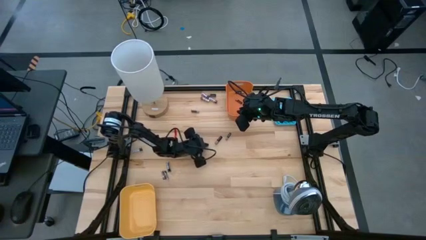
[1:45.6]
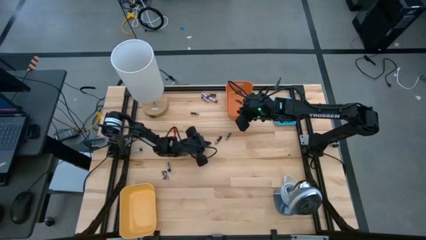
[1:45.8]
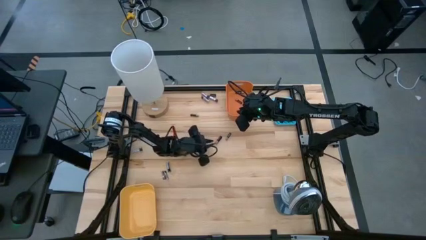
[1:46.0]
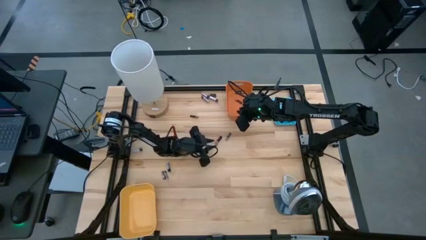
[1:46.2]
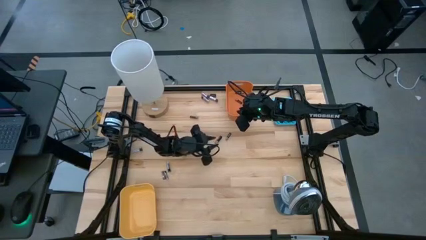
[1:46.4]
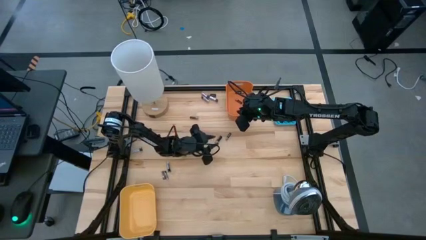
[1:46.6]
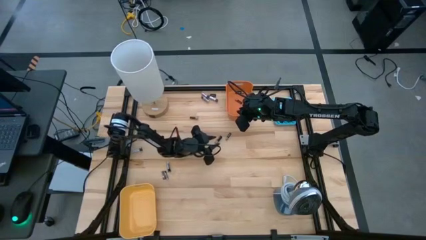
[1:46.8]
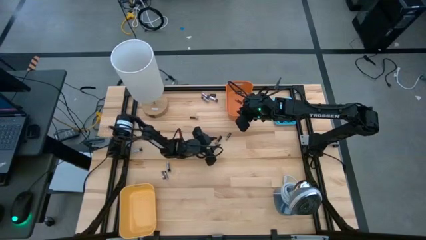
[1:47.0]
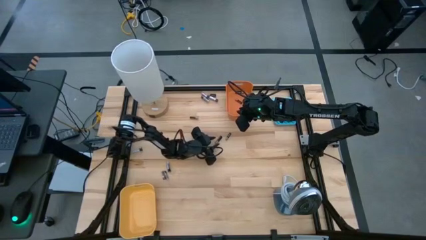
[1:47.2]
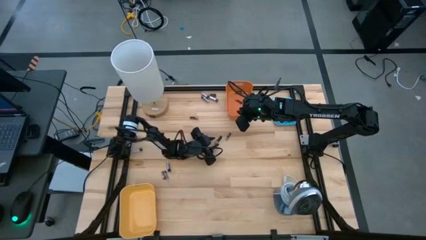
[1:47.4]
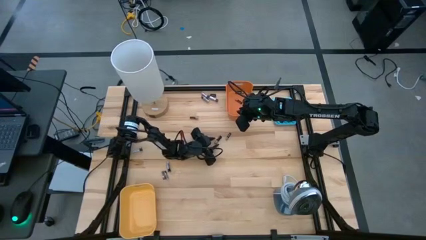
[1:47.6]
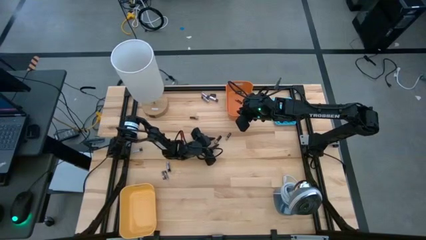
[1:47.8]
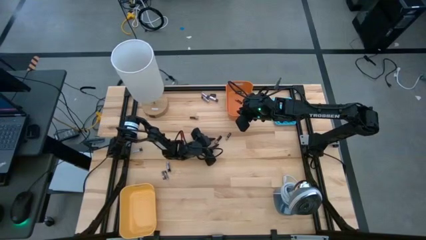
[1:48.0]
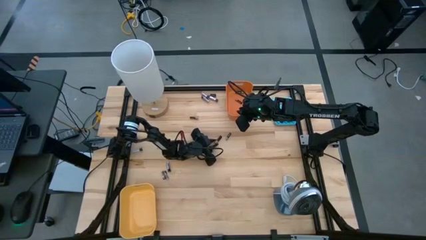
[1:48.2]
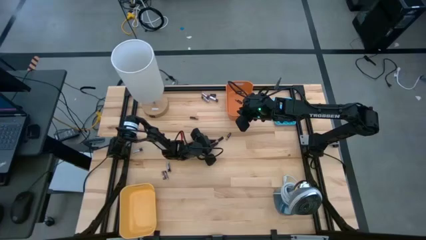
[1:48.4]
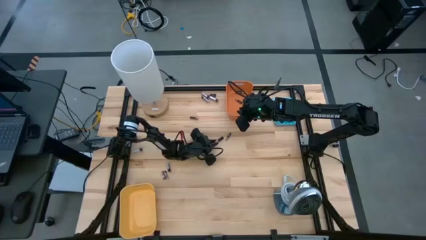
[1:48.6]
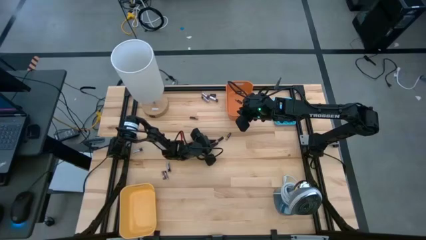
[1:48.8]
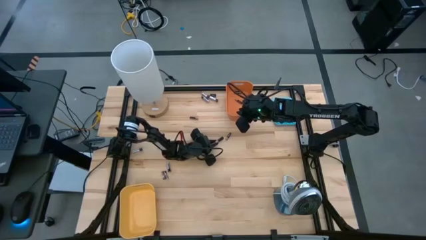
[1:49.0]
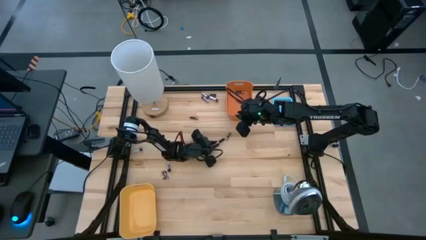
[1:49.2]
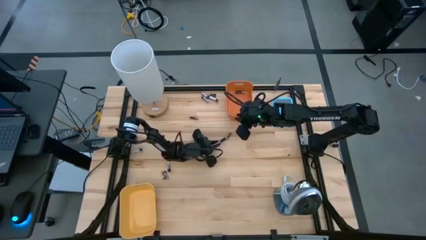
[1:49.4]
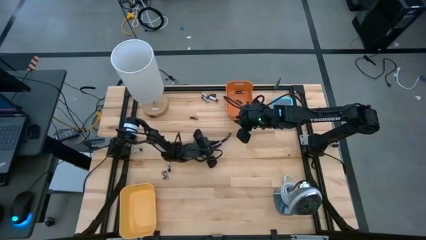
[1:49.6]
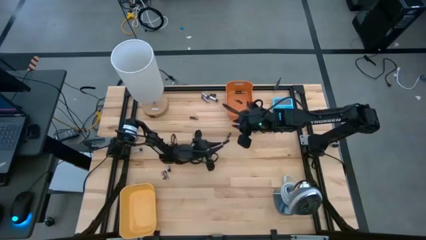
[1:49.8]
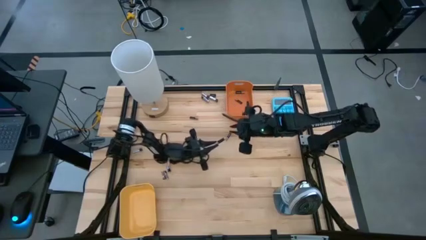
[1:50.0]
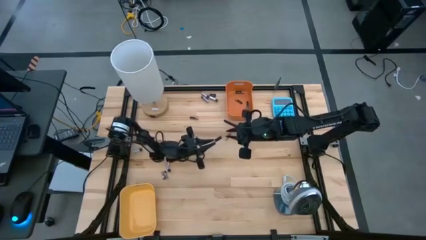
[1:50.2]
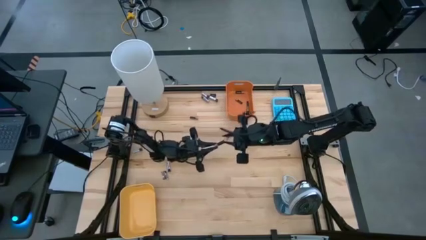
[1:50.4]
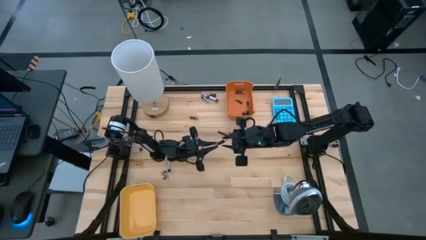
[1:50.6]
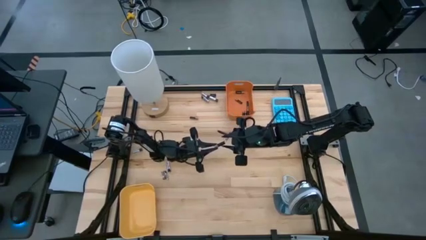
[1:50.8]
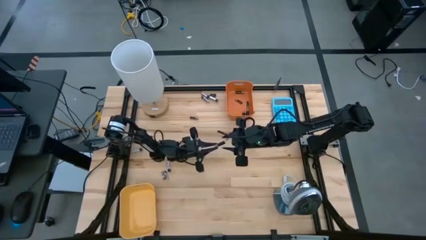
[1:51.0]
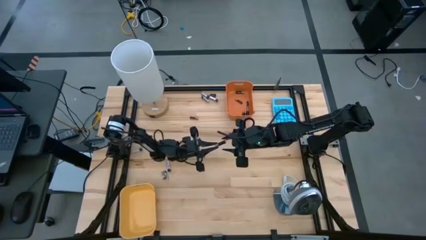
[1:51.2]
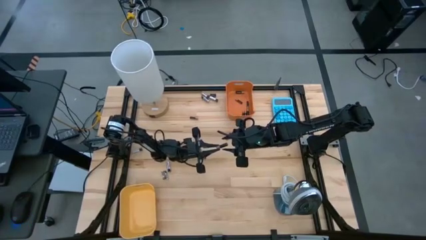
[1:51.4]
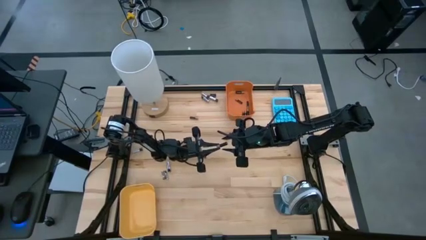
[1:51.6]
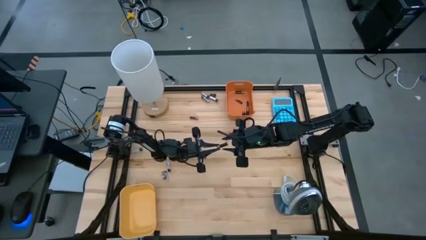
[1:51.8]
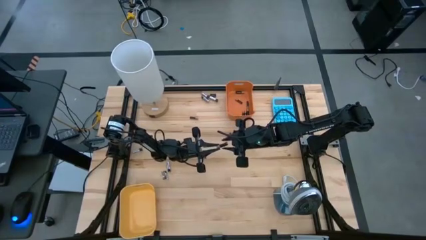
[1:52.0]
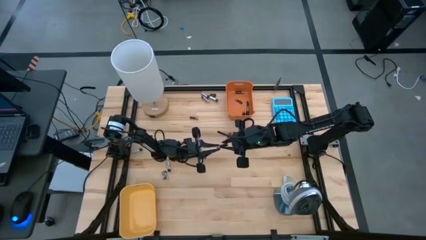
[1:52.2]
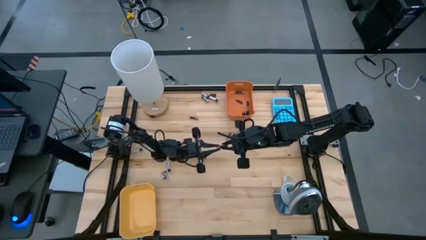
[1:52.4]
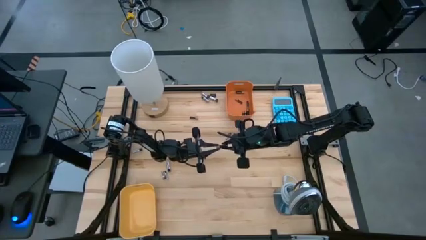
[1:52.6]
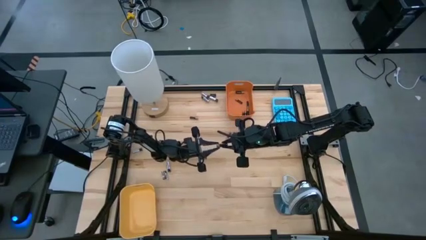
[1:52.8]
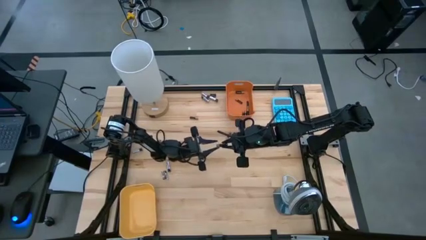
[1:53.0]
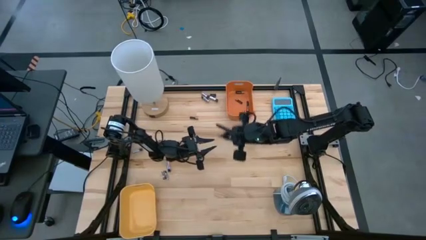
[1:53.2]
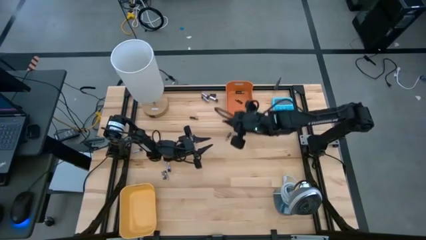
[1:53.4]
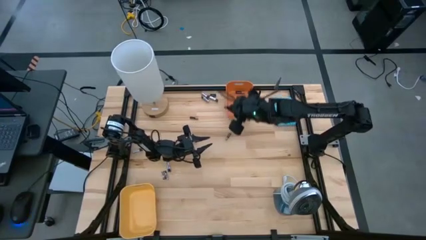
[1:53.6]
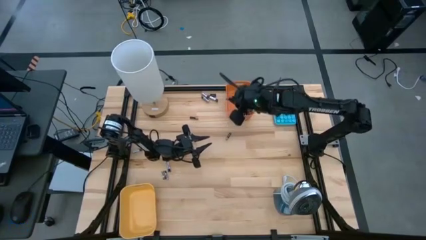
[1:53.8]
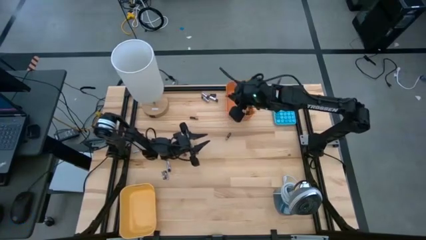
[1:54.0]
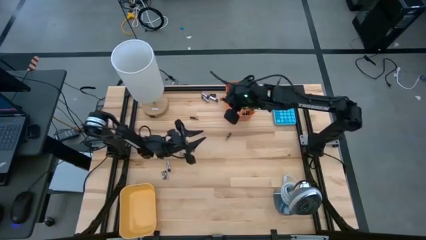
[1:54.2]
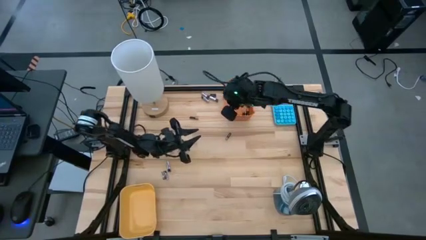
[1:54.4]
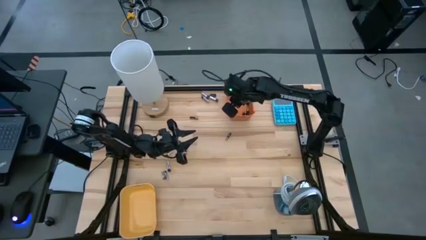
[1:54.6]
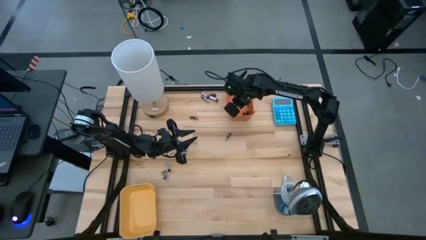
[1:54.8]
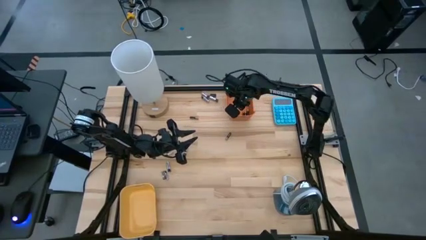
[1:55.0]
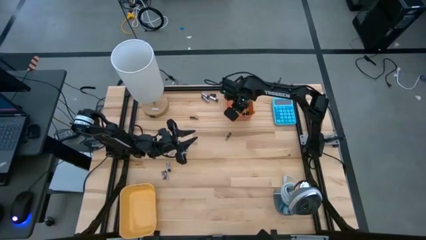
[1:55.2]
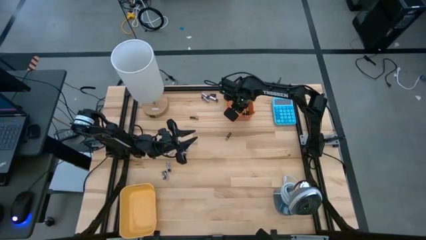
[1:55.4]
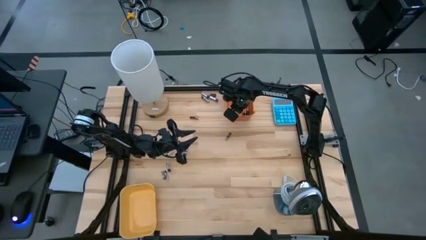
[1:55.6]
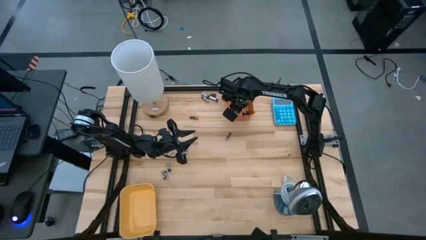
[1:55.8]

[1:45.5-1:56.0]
Task: Sort batteries
Put the black battery into the orange bin

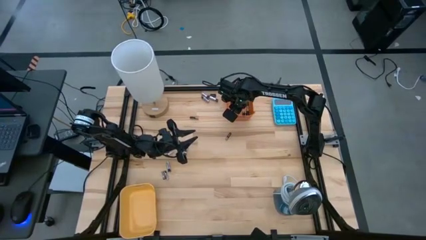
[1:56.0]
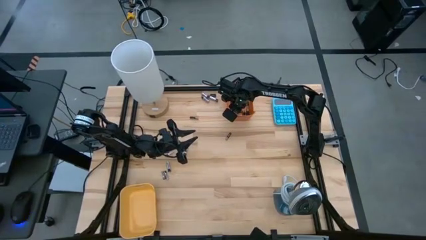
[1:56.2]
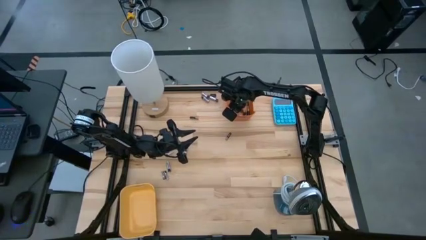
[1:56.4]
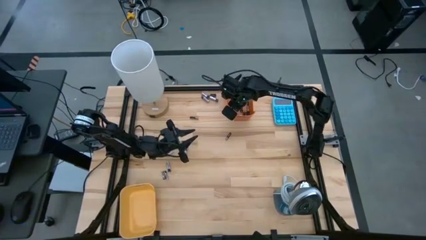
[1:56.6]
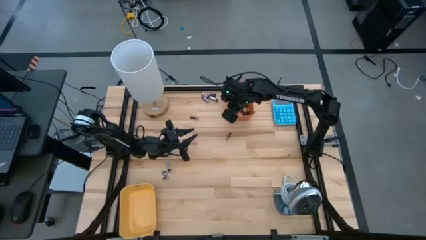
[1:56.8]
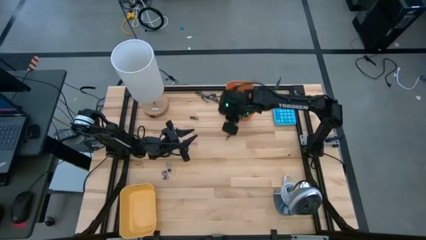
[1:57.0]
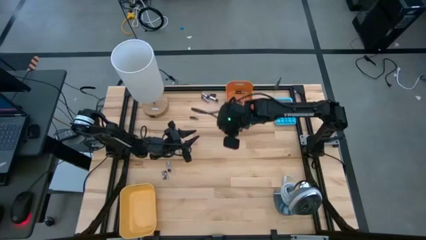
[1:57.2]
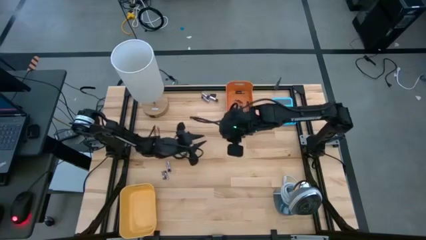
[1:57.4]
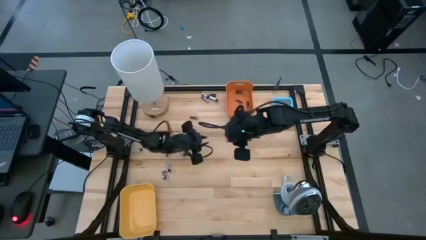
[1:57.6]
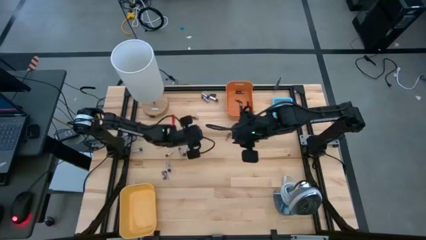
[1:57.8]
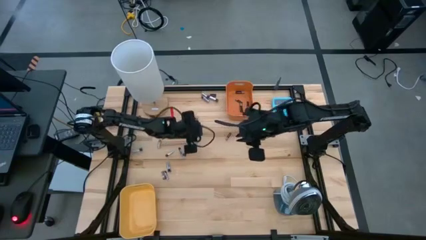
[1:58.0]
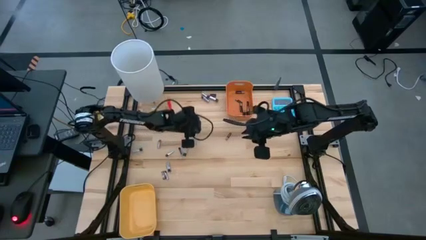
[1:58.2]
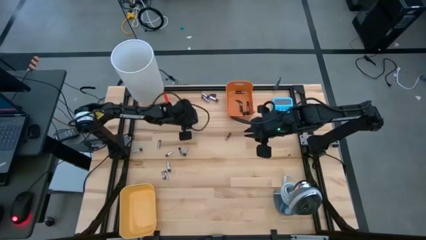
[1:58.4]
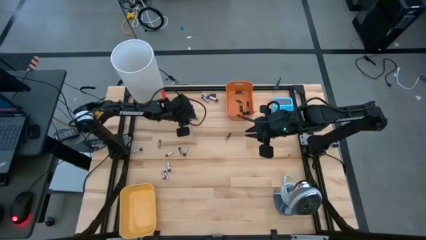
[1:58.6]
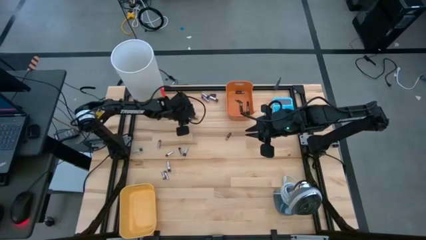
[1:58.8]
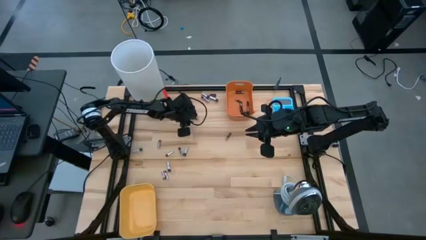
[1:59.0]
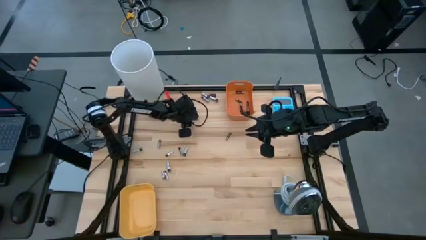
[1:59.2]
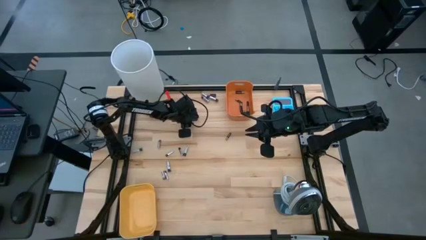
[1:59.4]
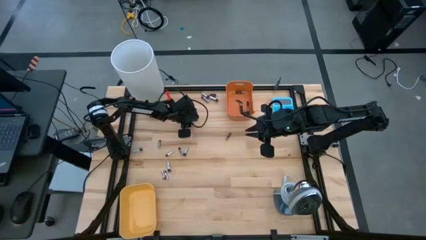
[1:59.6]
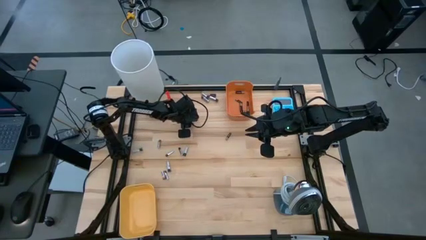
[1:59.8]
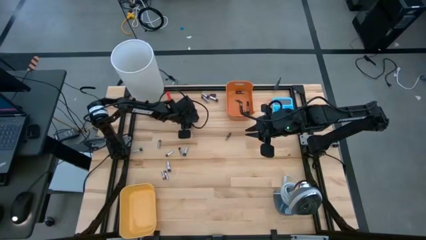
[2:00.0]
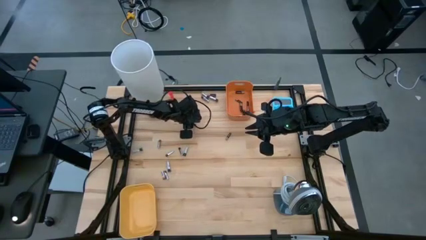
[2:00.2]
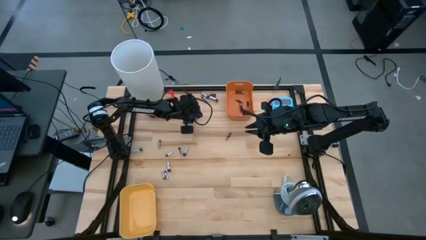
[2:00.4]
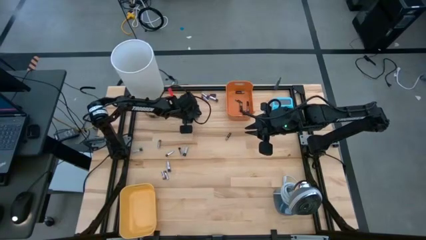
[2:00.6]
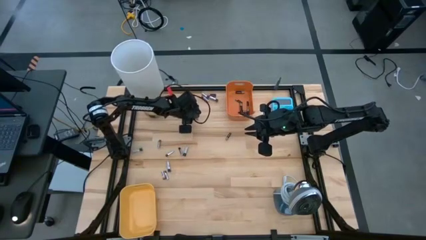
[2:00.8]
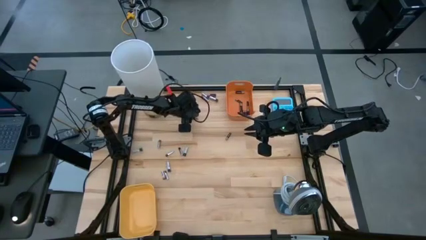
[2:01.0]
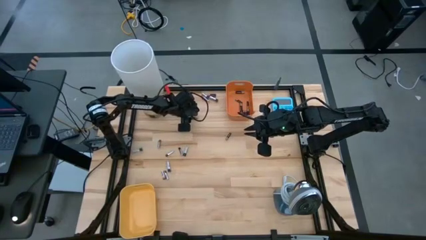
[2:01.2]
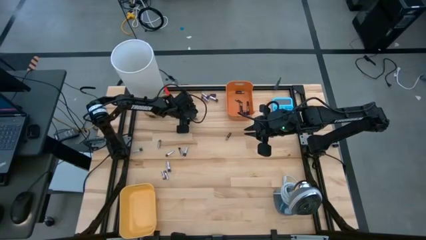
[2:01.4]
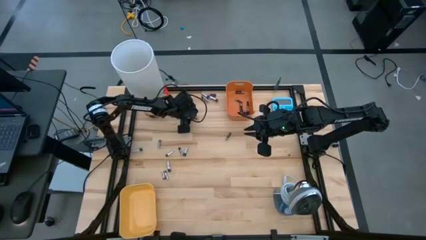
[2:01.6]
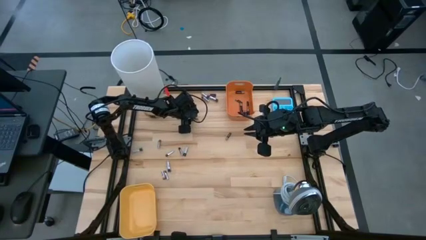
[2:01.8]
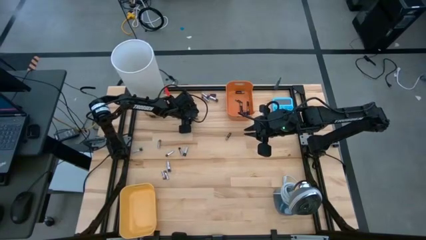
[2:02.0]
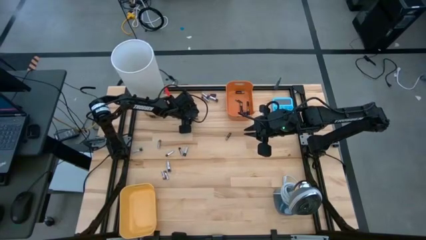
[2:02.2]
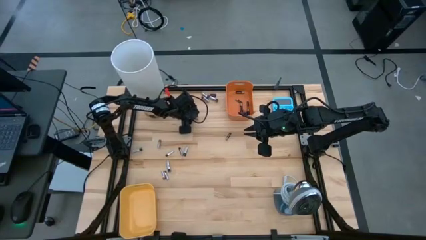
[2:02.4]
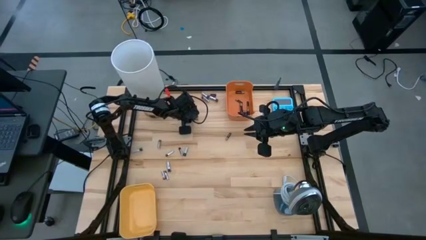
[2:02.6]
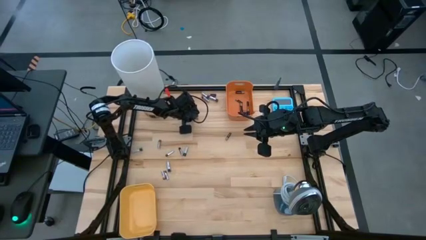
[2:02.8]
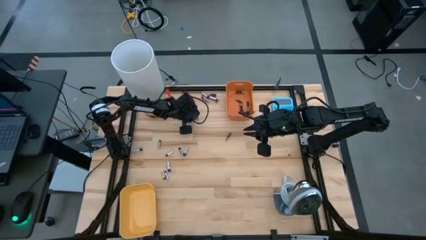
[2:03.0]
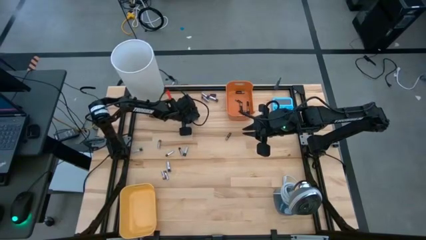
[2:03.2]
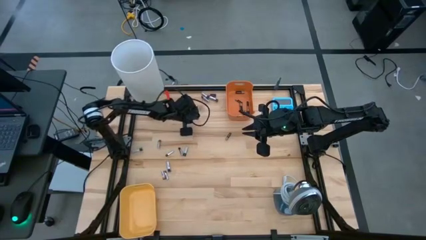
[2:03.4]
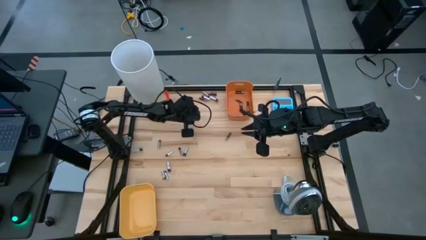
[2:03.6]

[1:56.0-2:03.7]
Put the black battery into the orange bin
